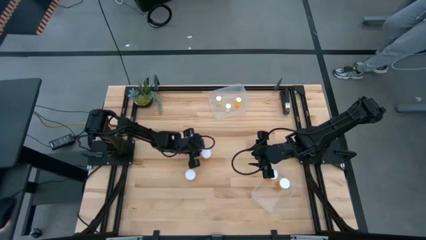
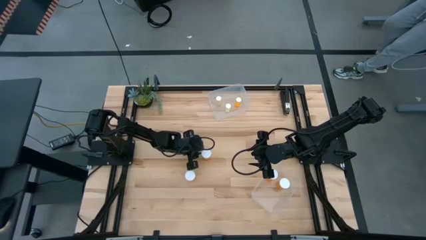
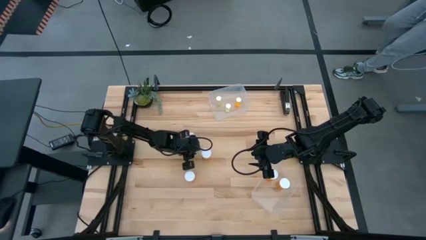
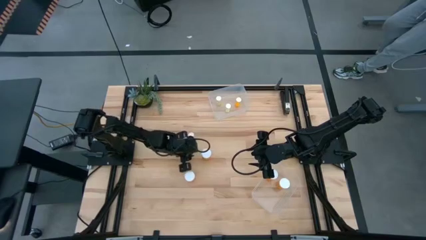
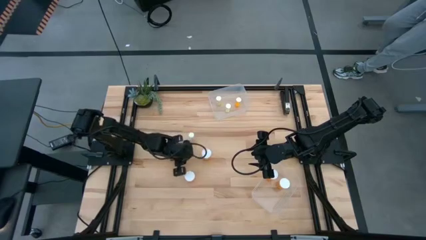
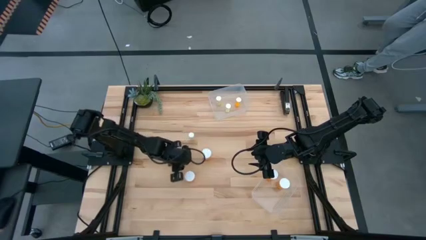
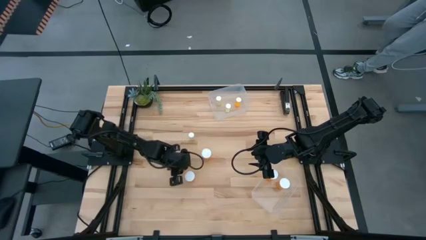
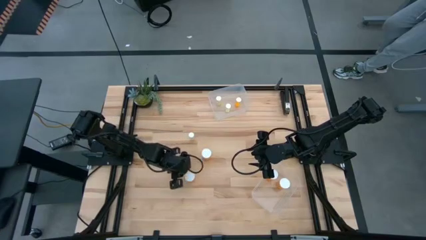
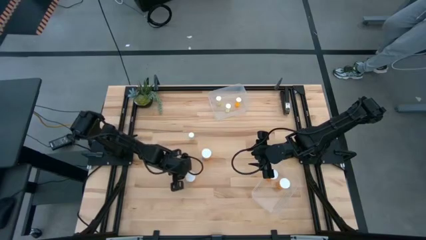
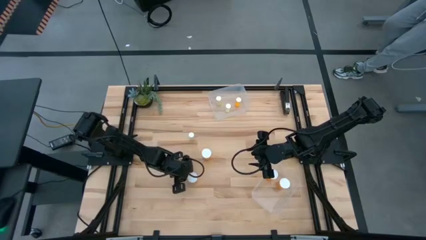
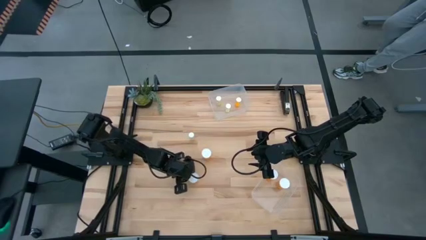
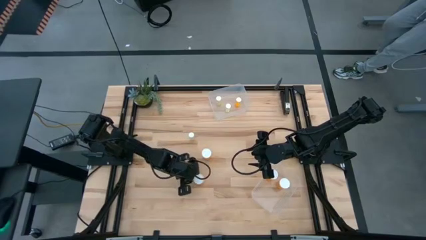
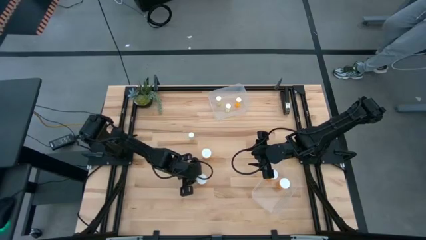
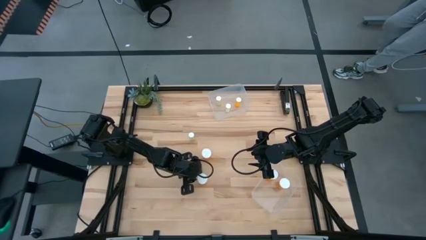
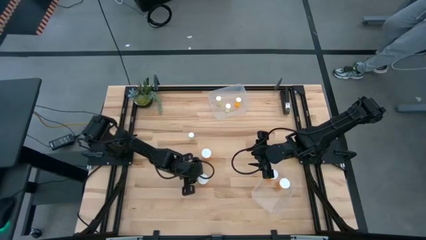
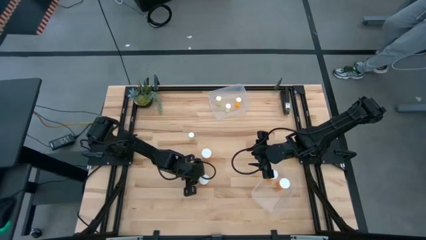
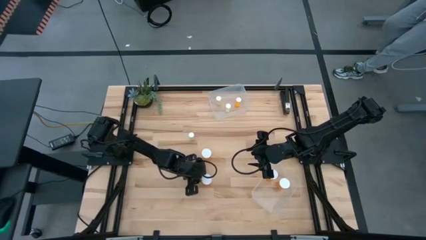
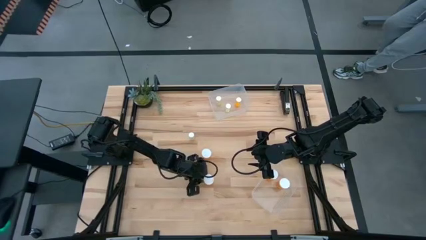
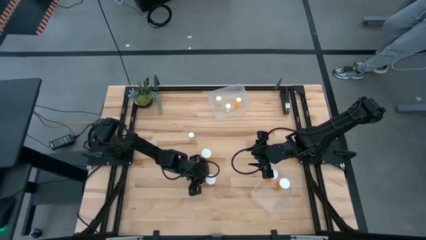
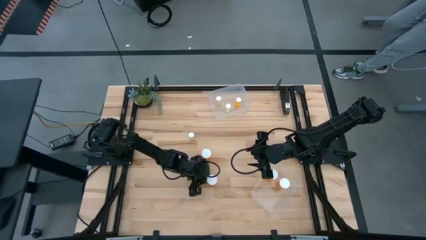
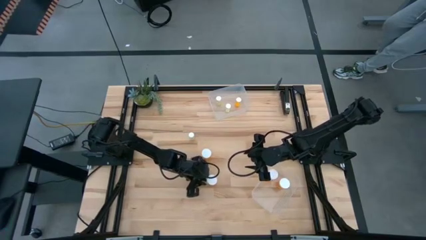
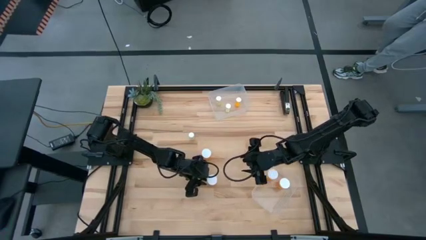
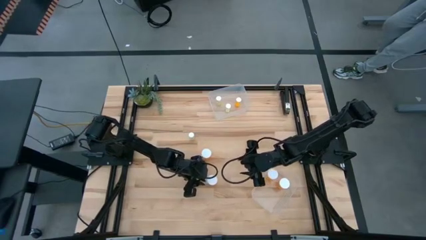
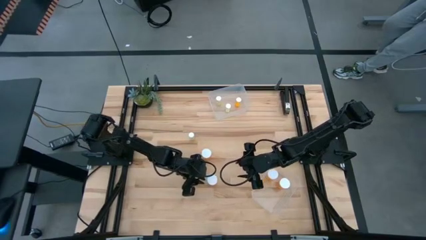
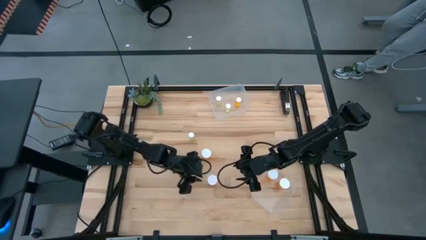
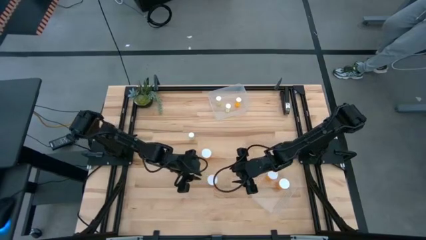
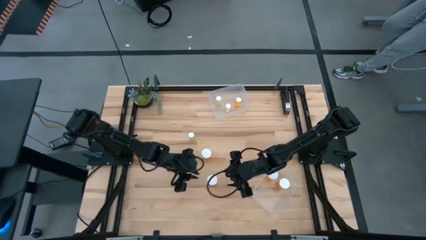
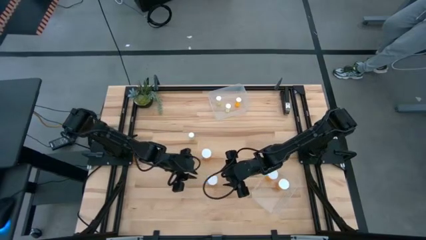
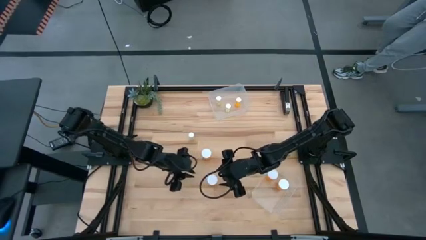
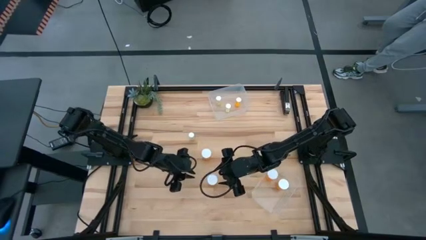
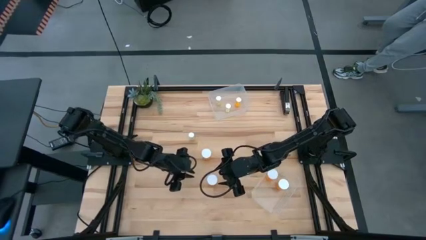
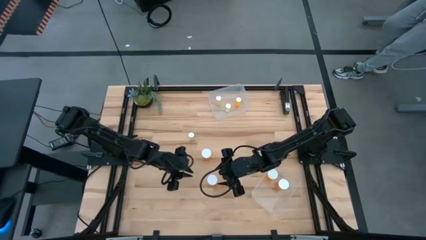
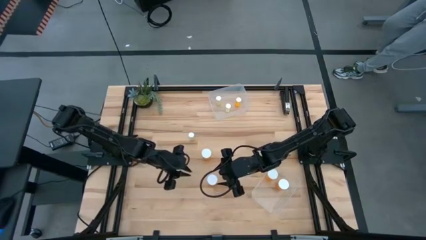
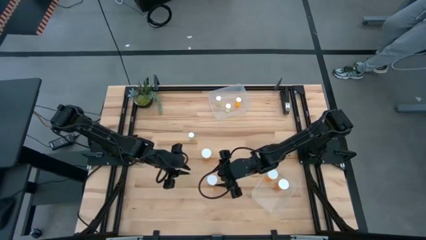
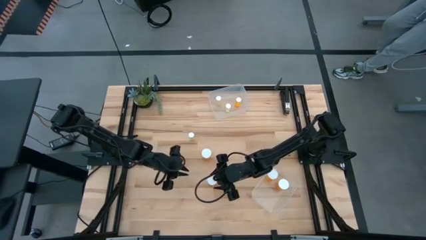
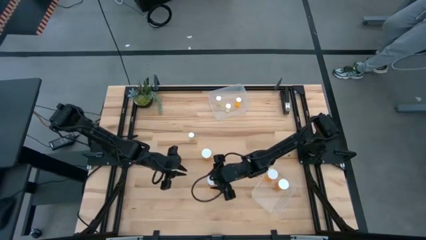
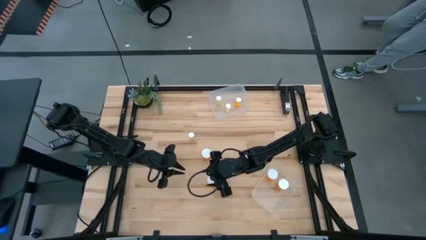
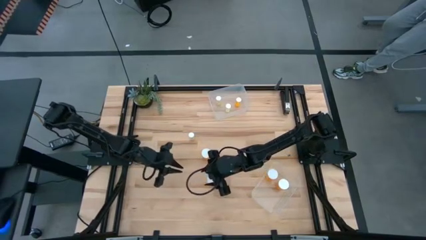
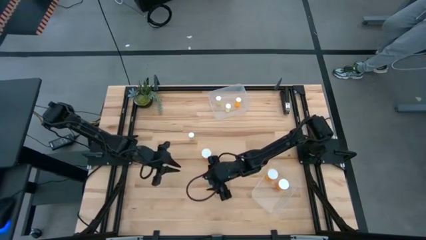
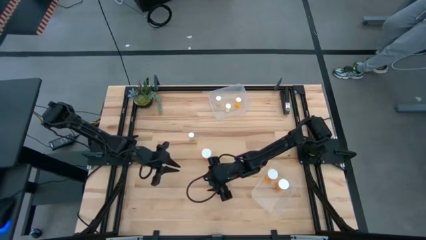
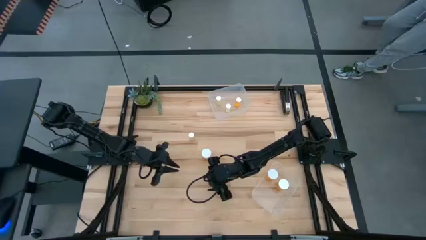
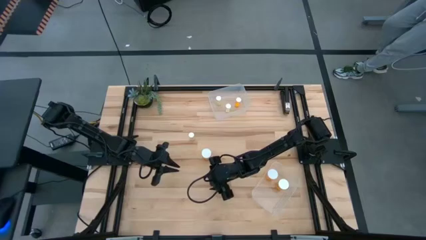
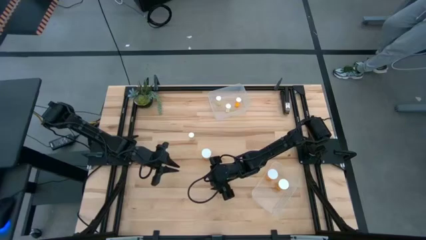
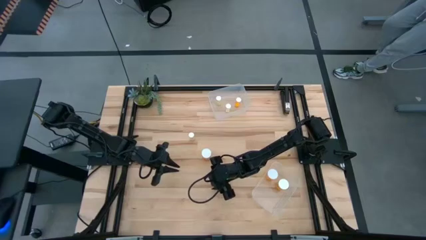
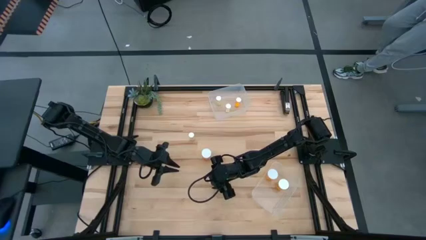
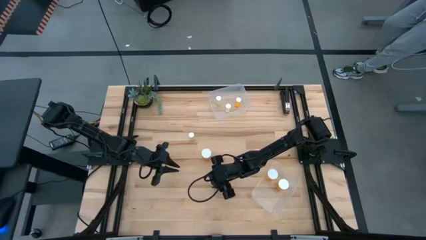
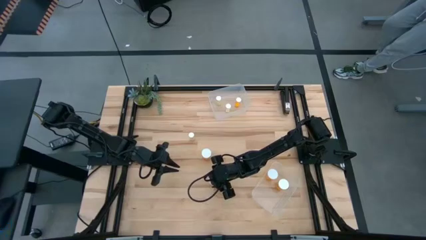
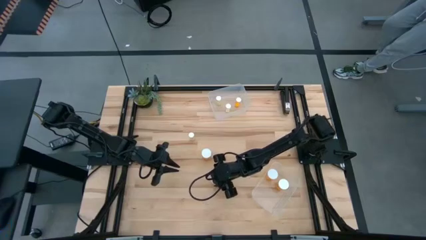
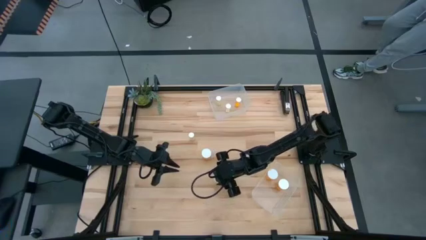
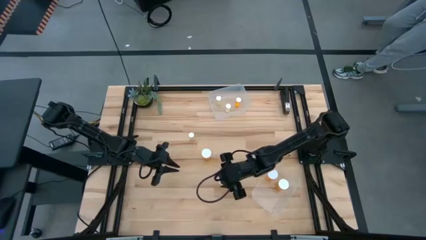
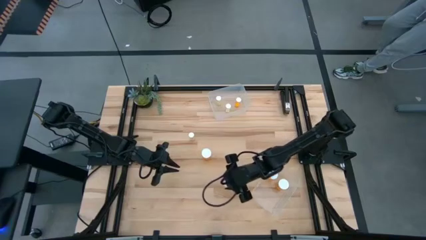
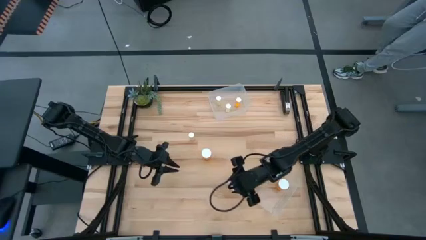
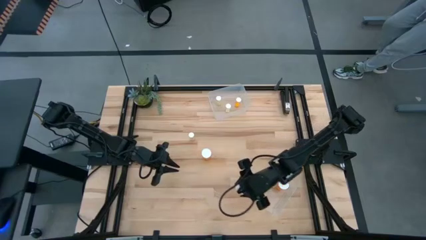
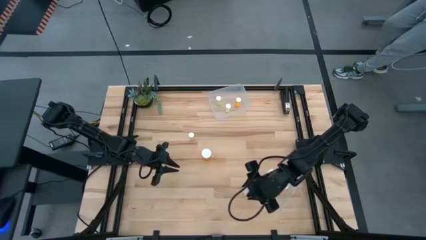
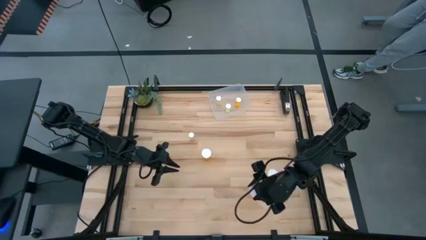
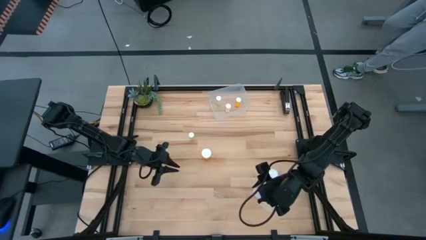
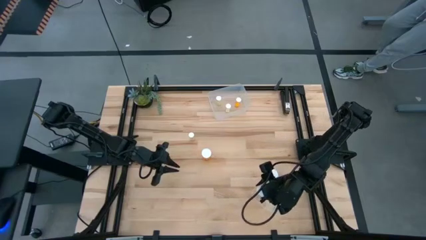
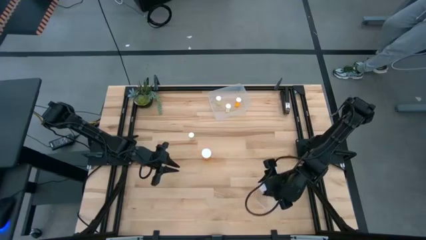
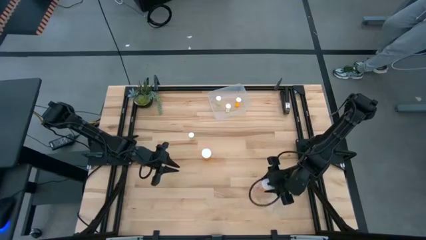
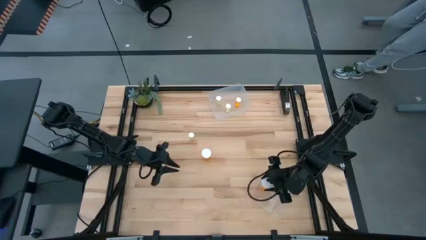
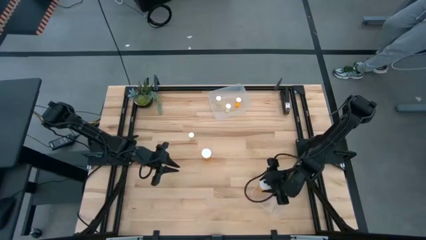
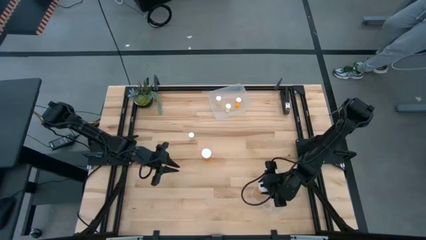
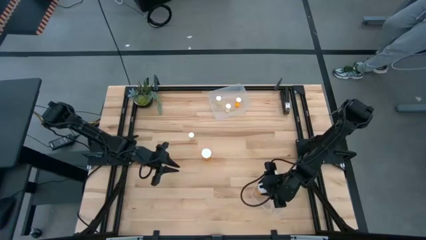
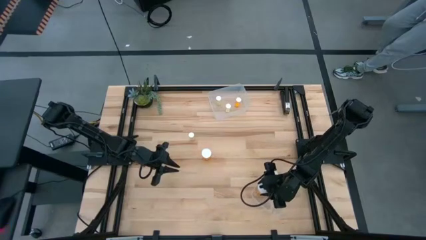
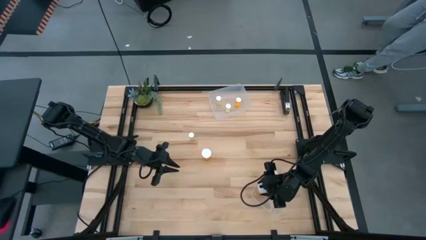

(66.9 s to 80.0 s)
Task: Pick and place medicine bottles into bin by pill shape (circle, oval)
Put the large orange pill bottle into the bottom transparent bin
